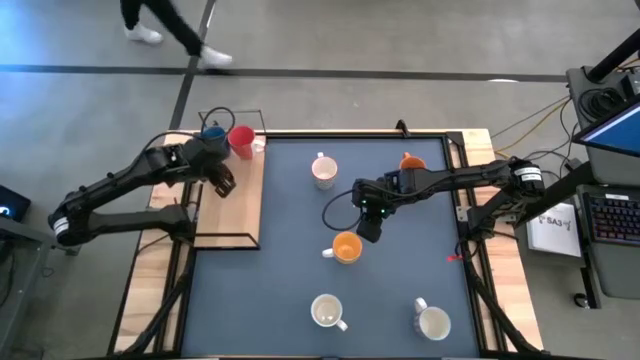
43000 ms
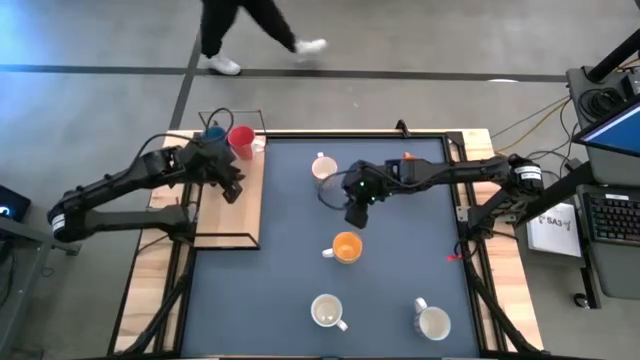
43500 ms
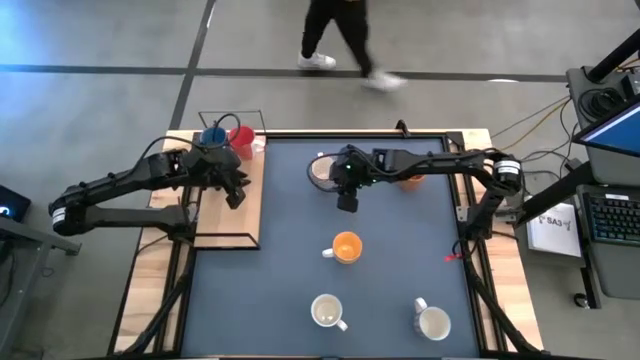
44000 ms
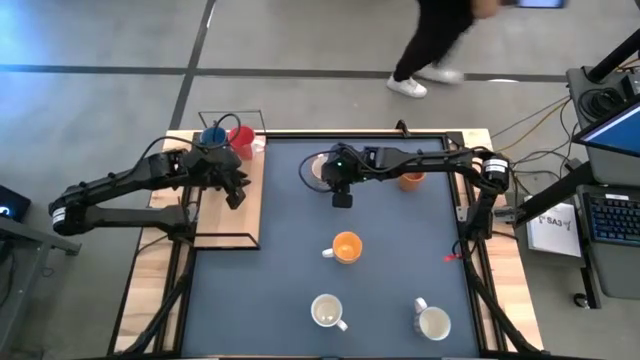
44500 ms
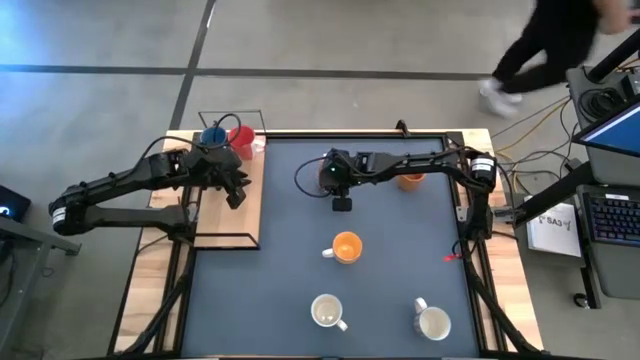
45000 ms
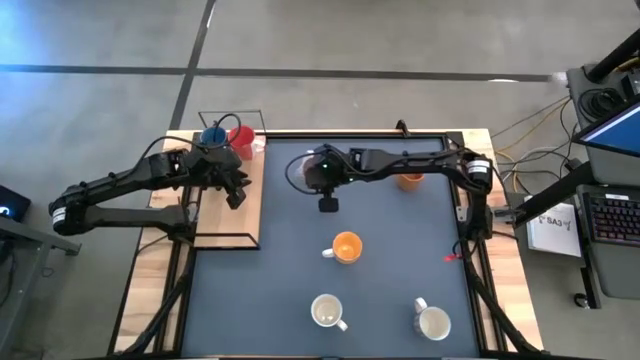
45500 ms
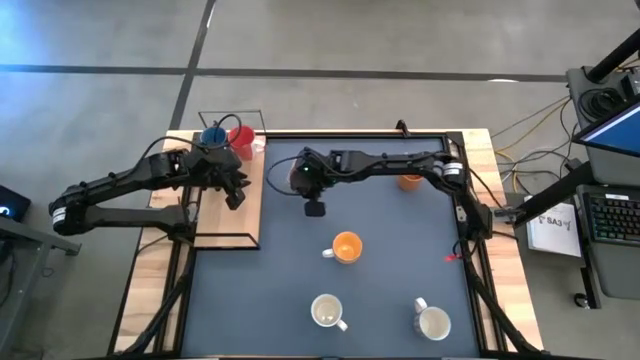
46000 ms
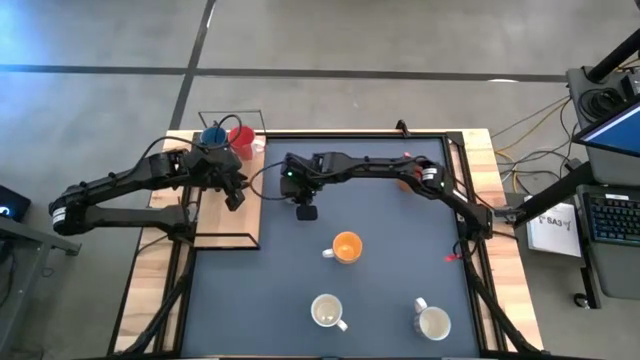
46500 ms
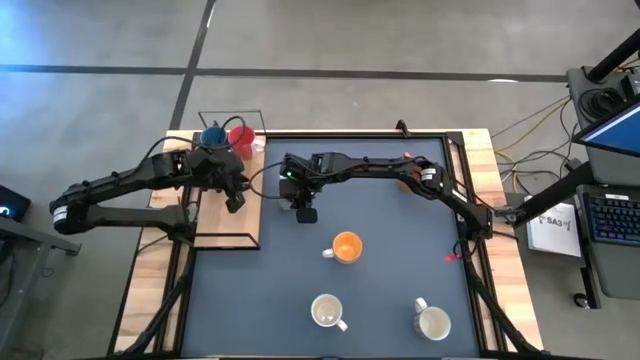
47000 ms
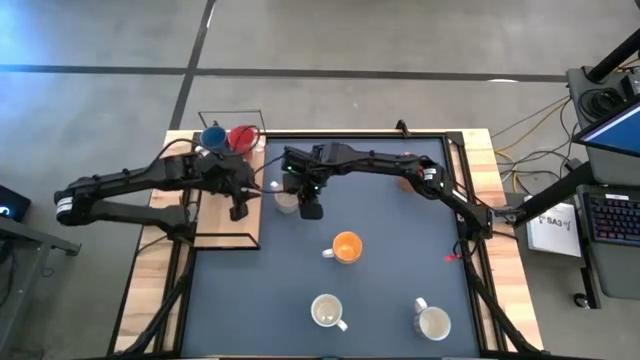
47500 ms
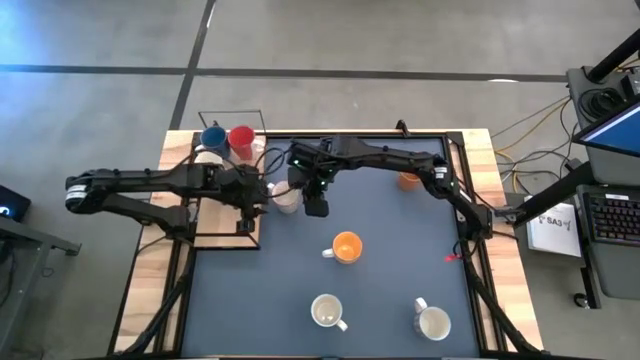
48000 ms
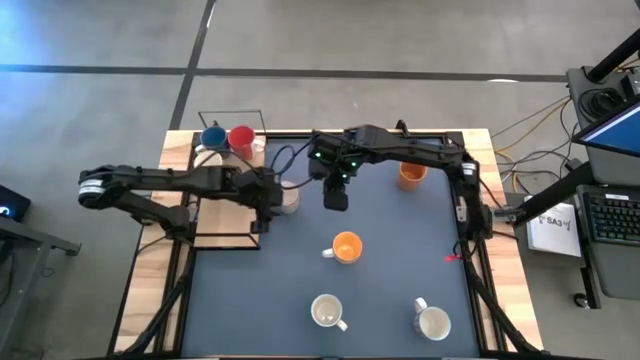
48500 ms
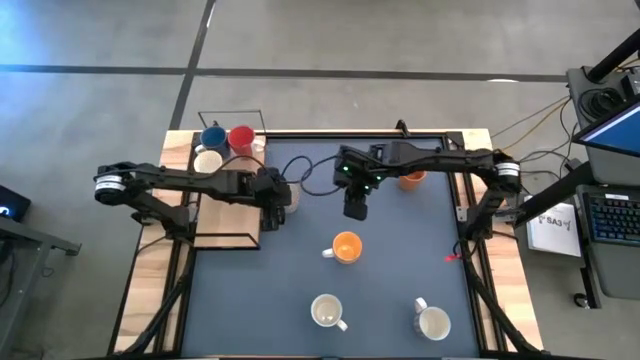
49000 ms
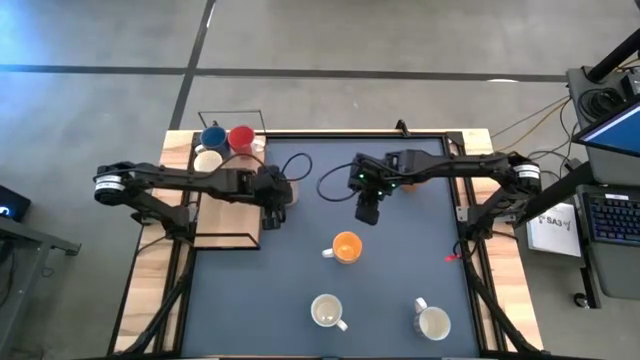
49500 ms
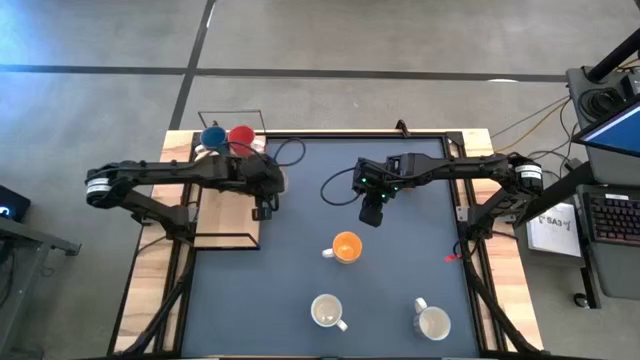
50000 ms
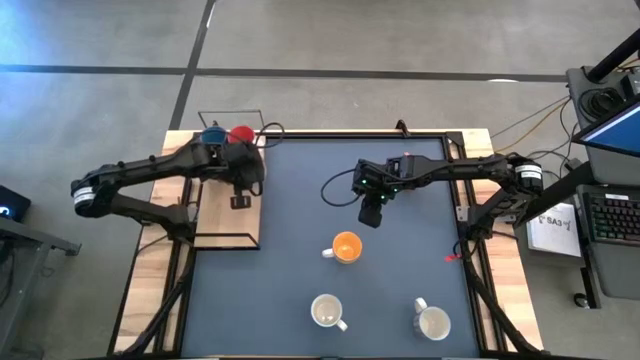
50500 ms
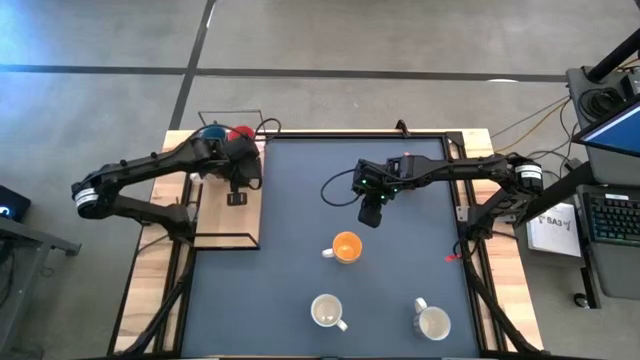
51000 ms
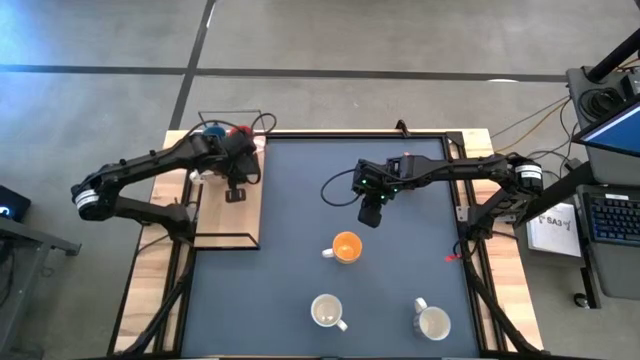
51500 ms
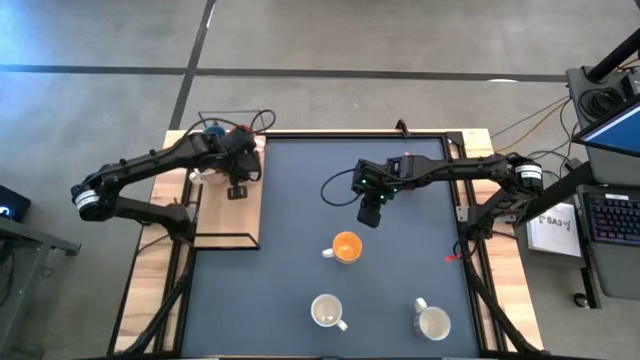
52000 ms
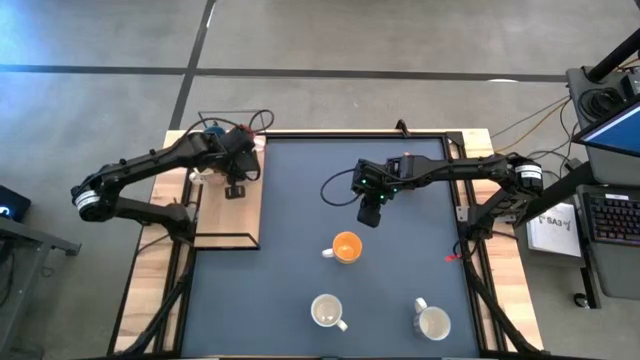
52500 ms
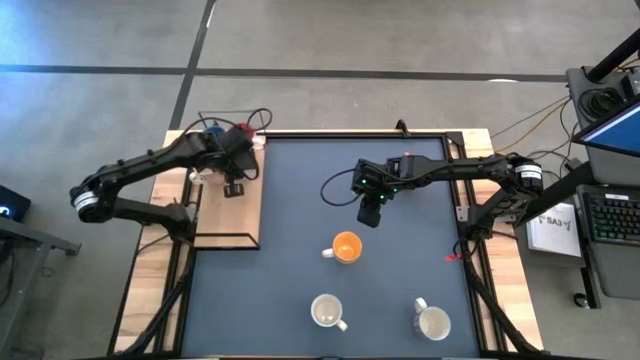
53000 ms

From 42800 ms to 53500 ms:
Task: Place coffee mugs
Put the brown patterned mug on the shelf

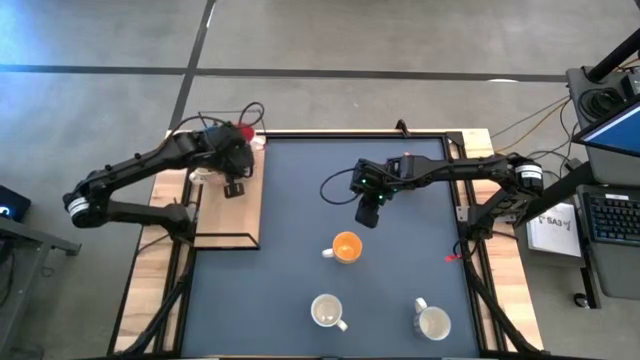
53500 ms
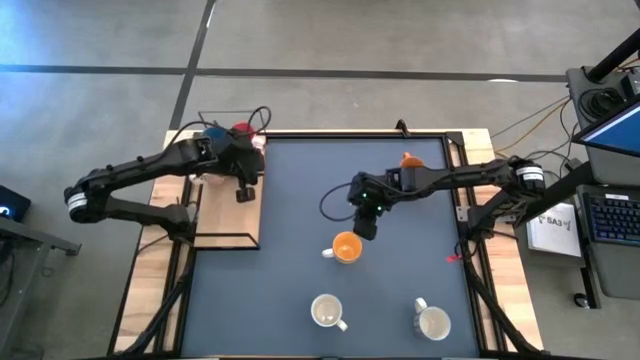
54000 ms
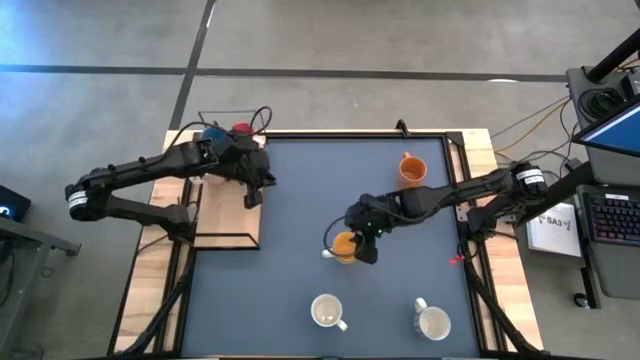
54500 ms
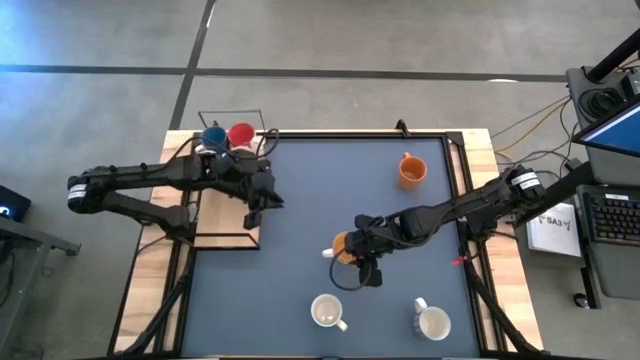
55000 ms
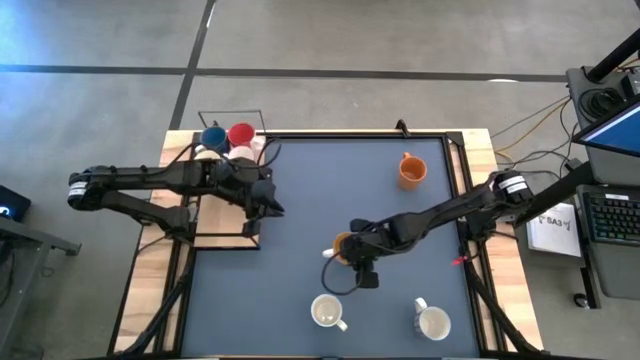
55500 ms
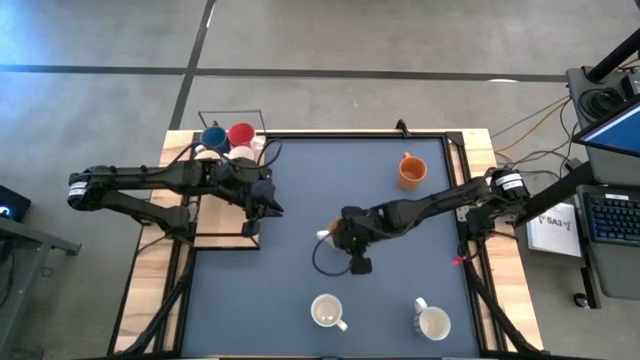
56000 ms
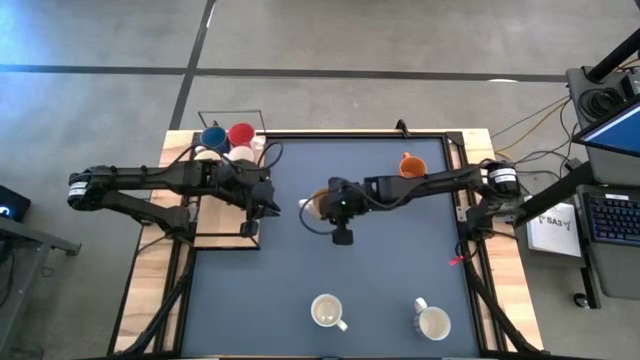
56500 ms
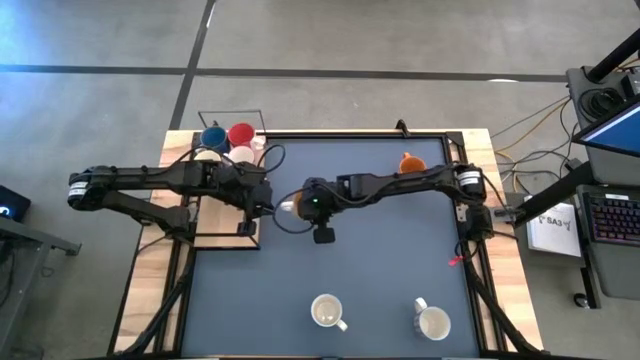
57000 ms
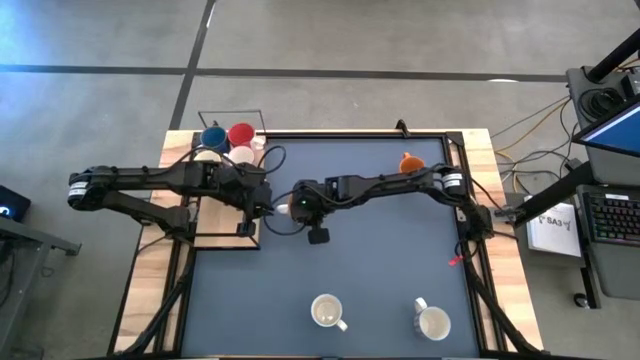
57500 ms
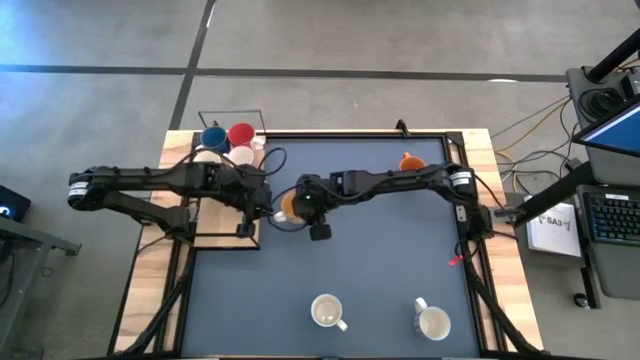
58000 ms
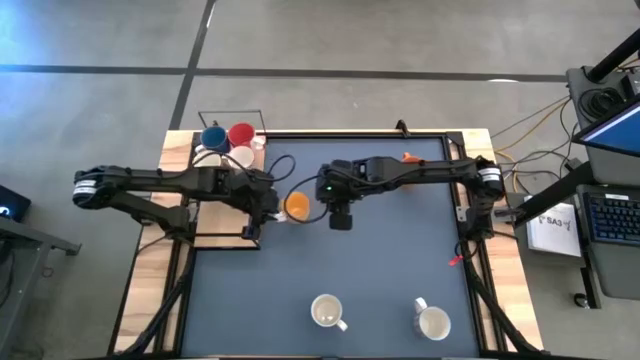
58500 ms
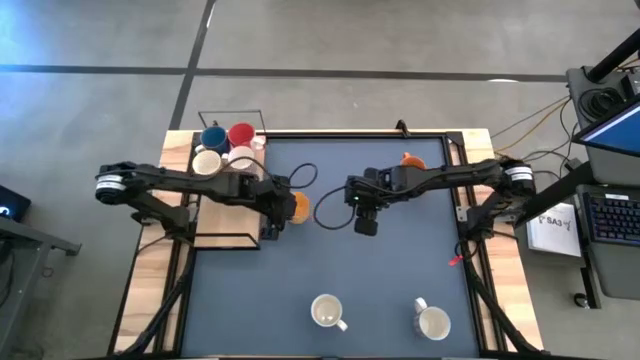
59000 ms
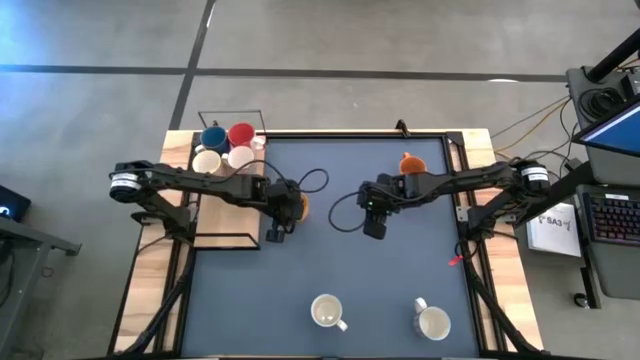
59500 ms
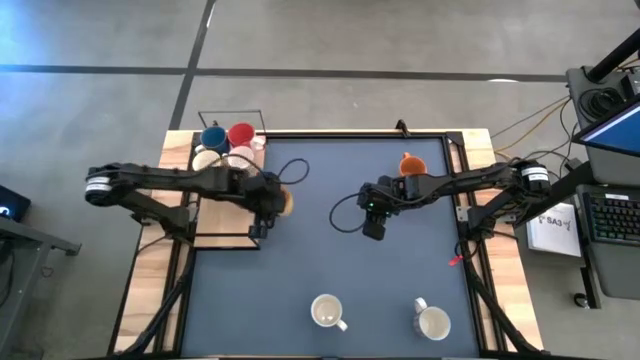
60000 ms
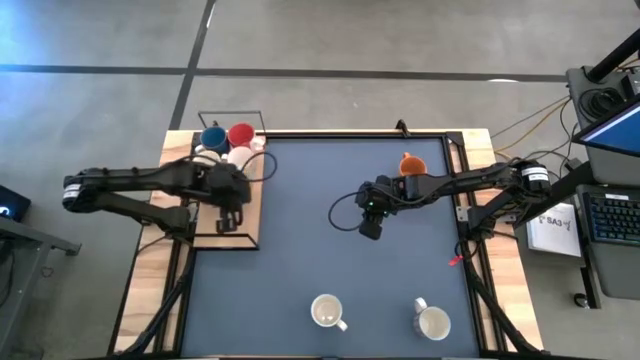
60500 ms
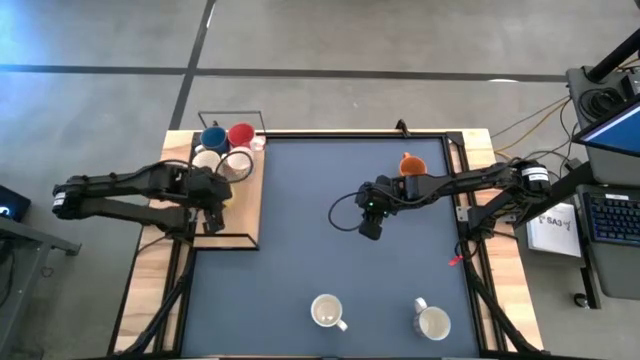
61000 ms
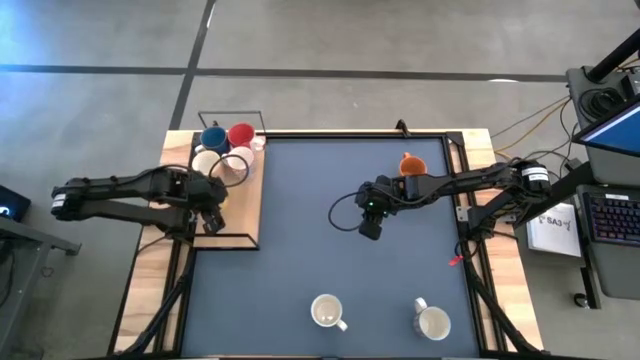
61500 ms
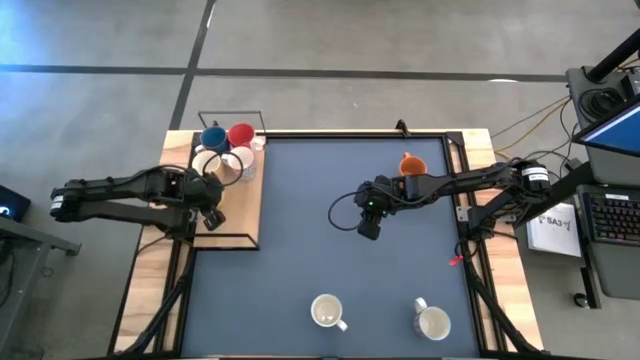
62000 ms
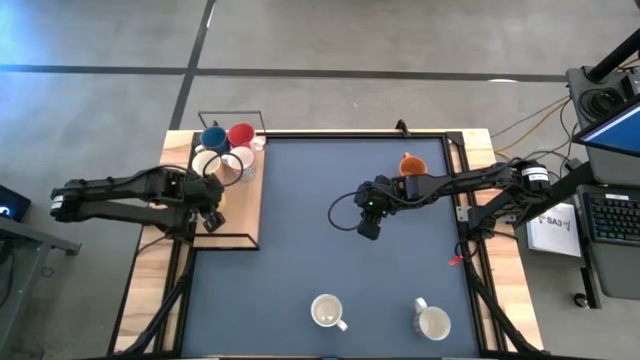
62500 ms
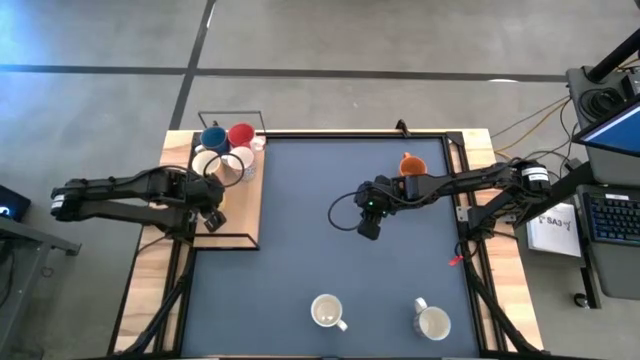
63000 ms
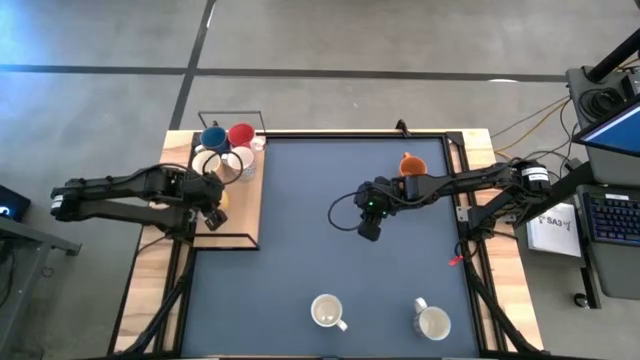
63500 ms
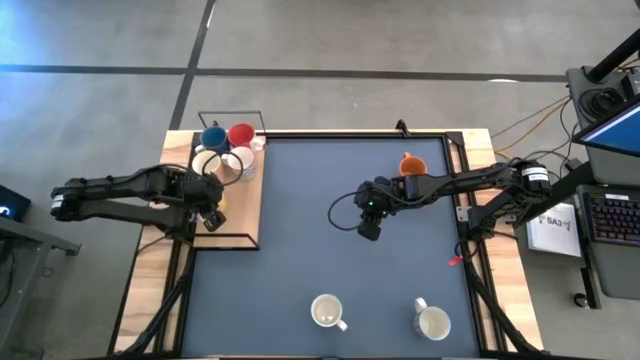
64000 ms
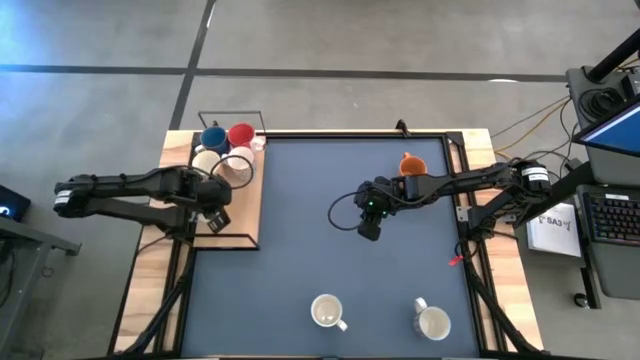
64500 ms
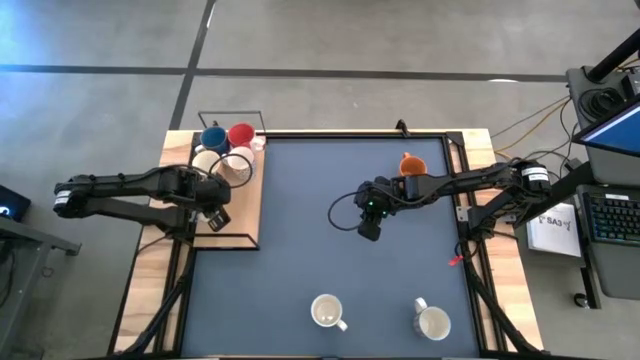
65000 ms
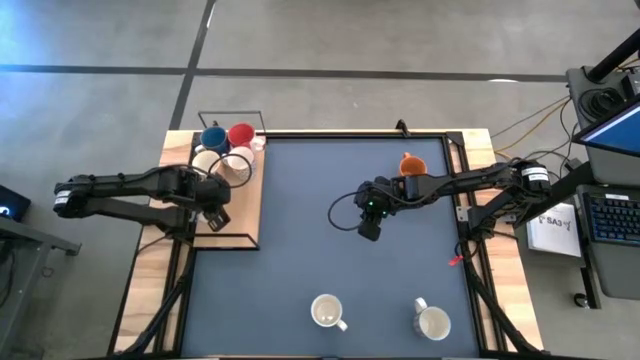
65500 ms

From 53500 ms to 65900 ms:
Put the yellow patterned mug on the shelf
